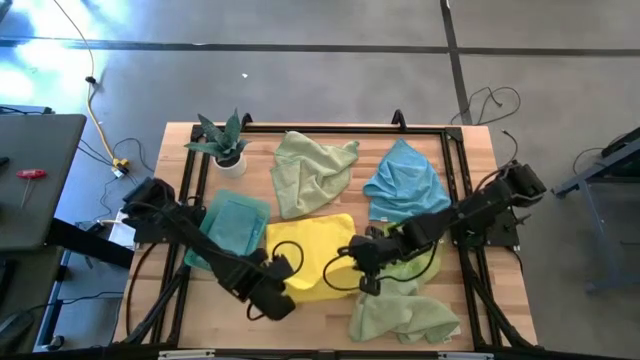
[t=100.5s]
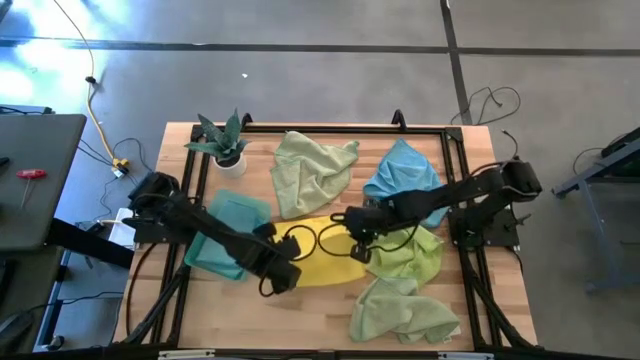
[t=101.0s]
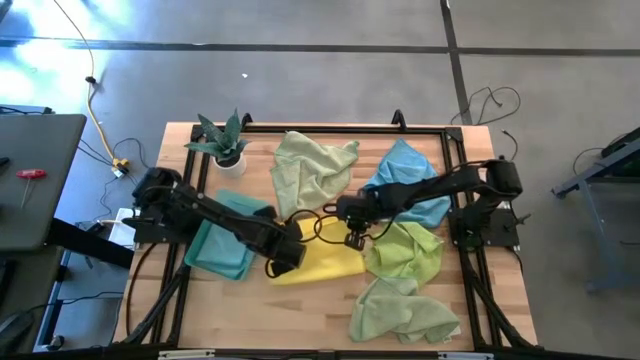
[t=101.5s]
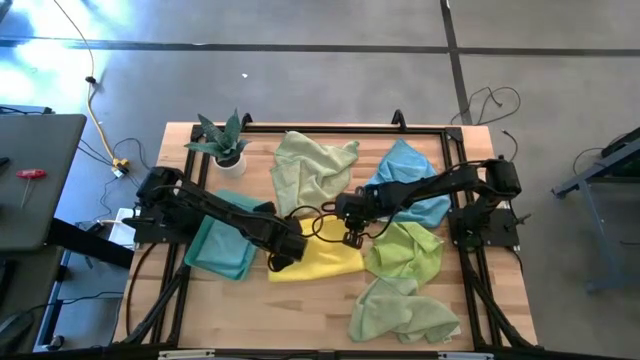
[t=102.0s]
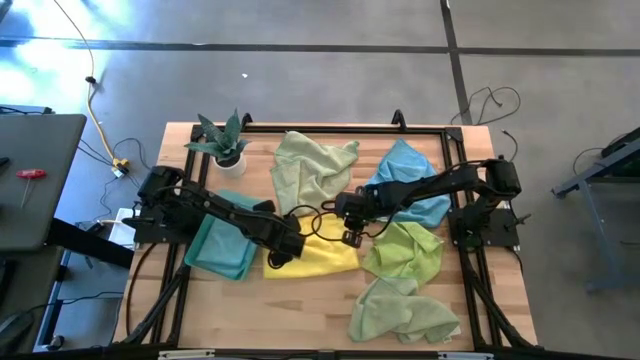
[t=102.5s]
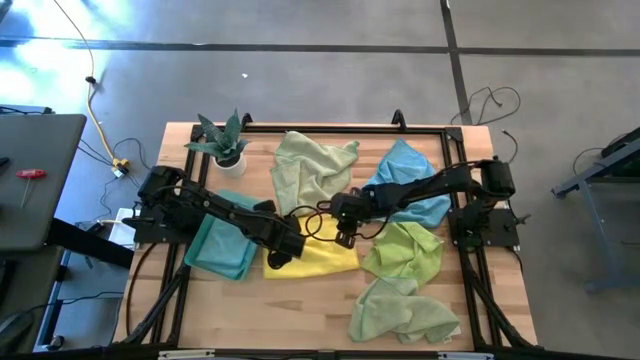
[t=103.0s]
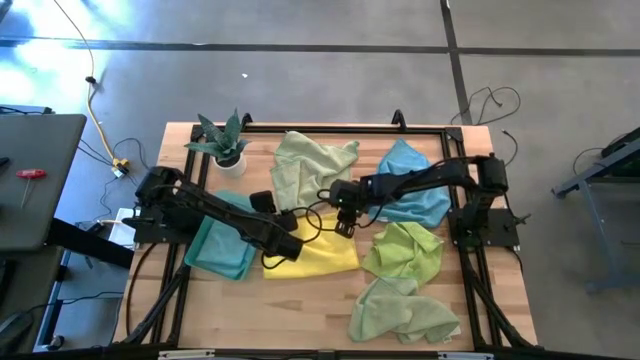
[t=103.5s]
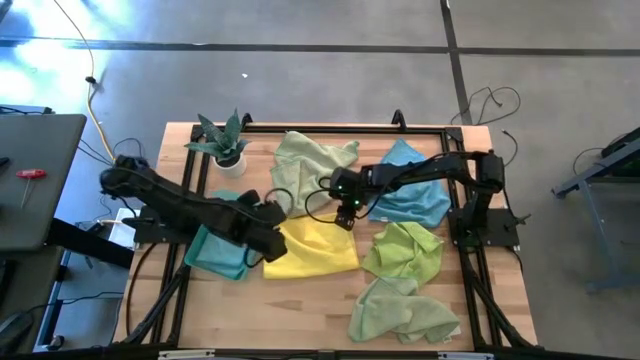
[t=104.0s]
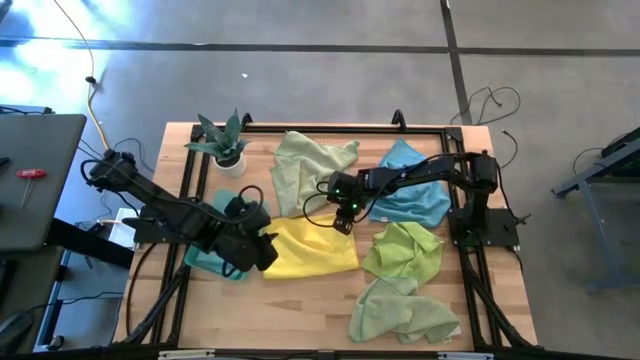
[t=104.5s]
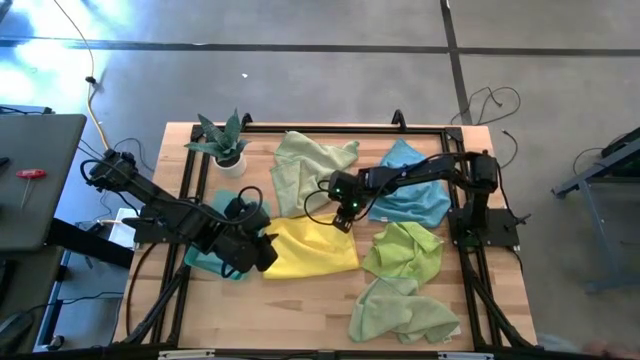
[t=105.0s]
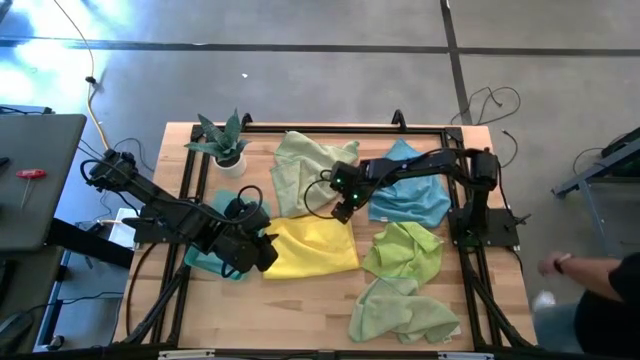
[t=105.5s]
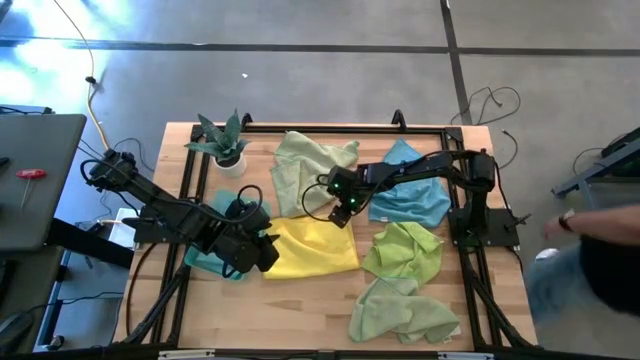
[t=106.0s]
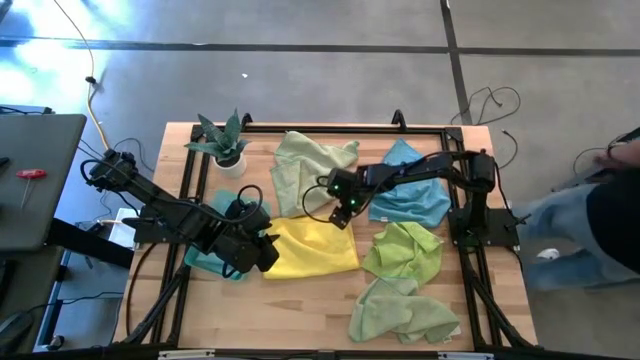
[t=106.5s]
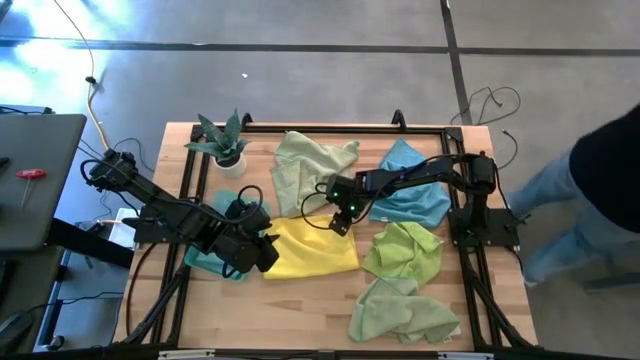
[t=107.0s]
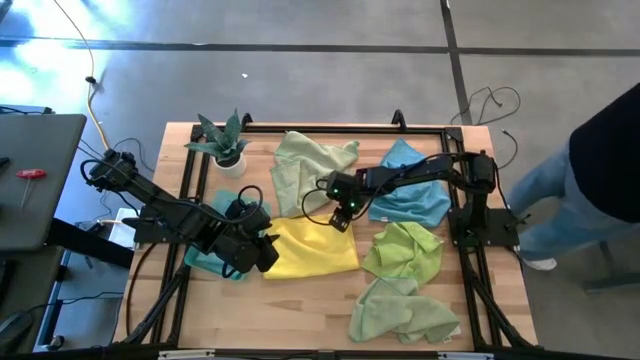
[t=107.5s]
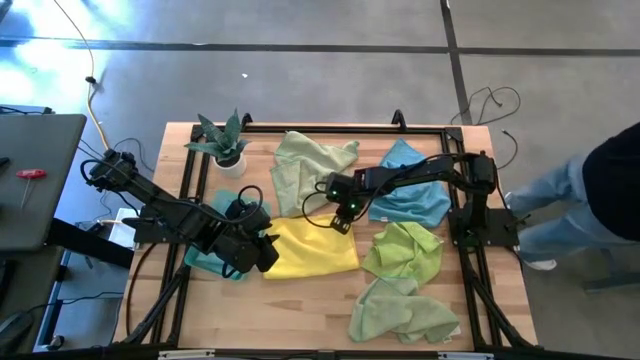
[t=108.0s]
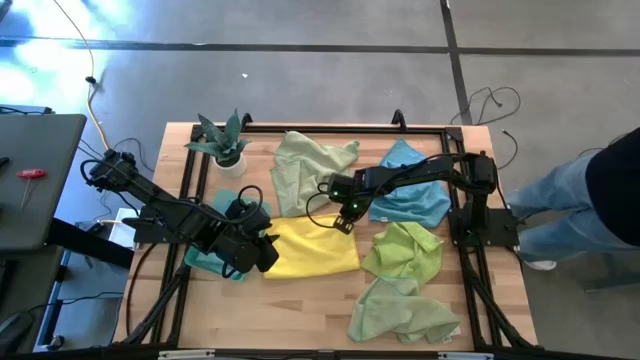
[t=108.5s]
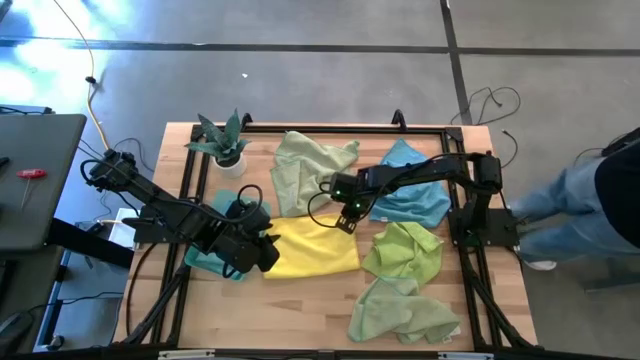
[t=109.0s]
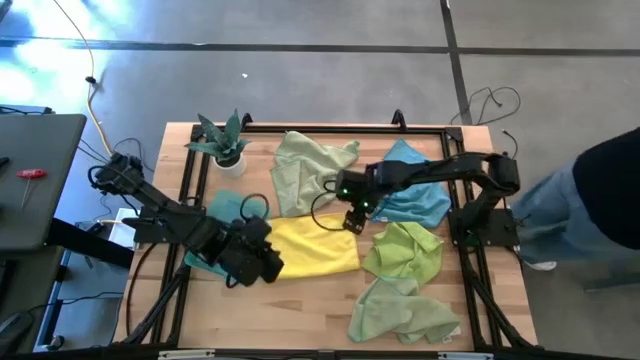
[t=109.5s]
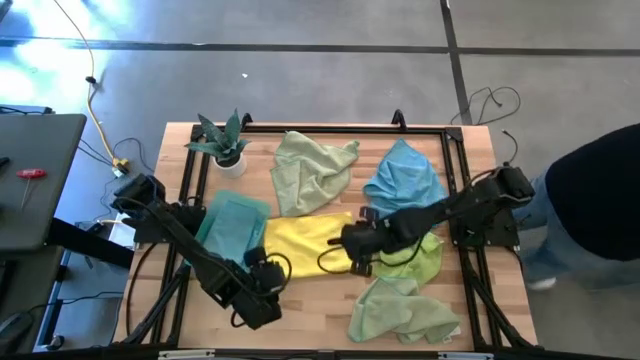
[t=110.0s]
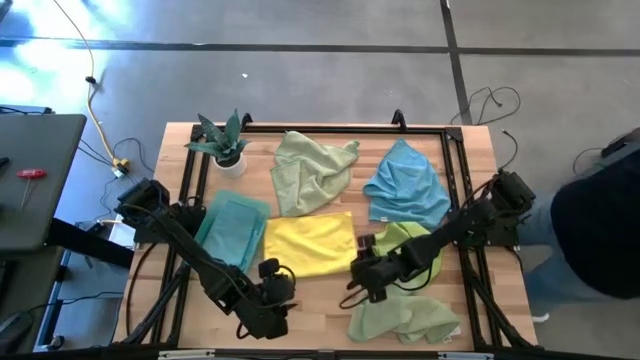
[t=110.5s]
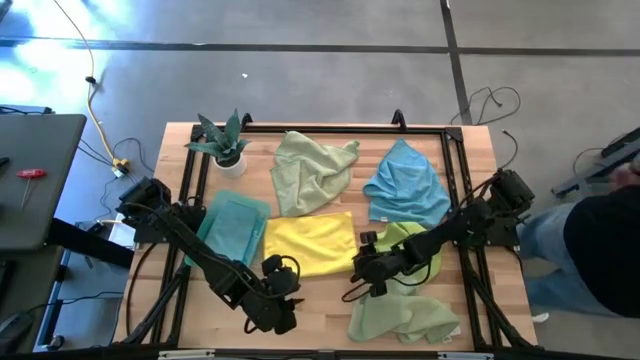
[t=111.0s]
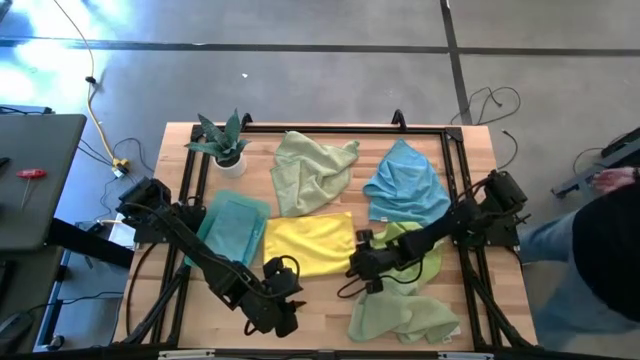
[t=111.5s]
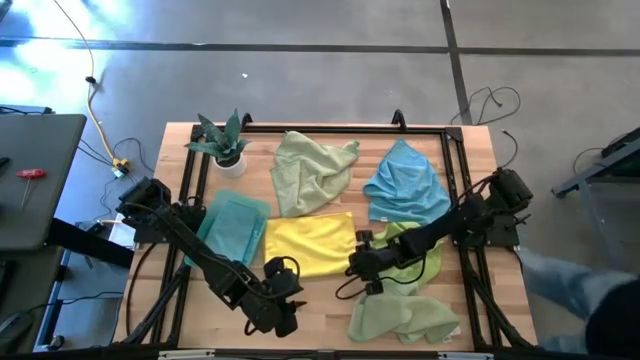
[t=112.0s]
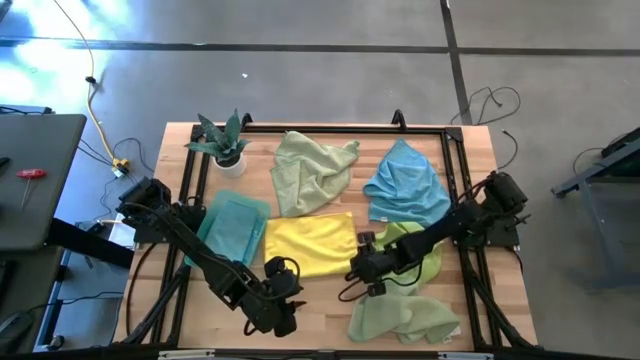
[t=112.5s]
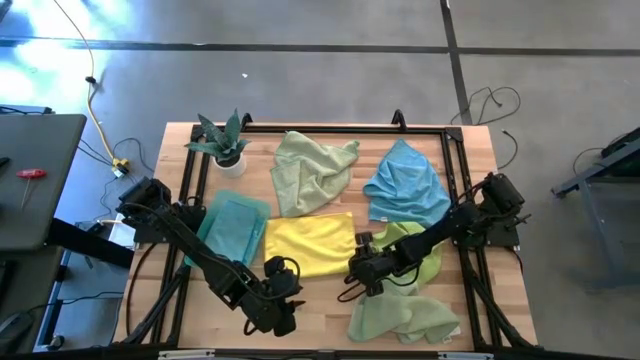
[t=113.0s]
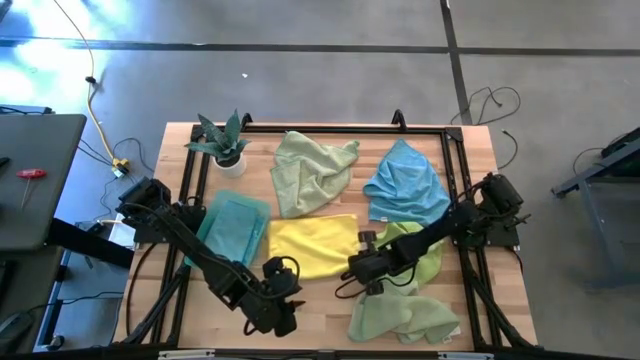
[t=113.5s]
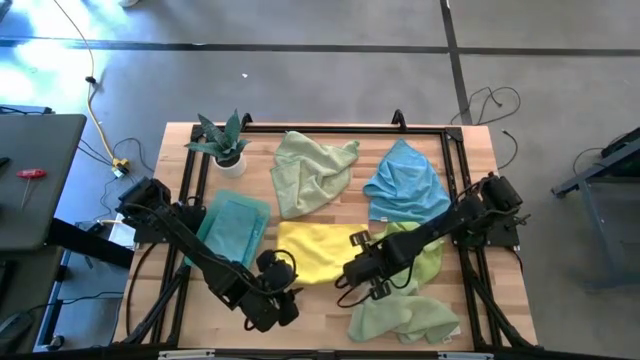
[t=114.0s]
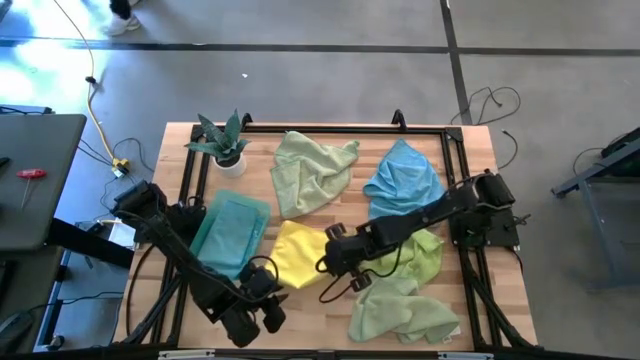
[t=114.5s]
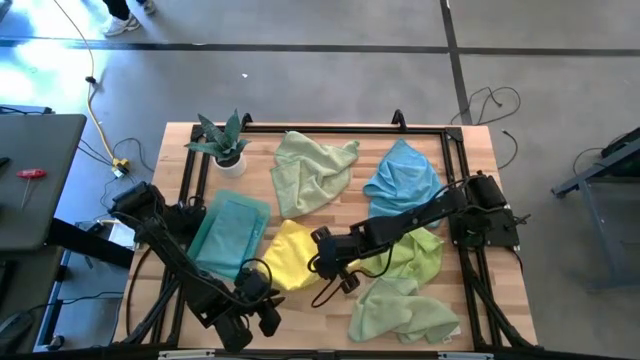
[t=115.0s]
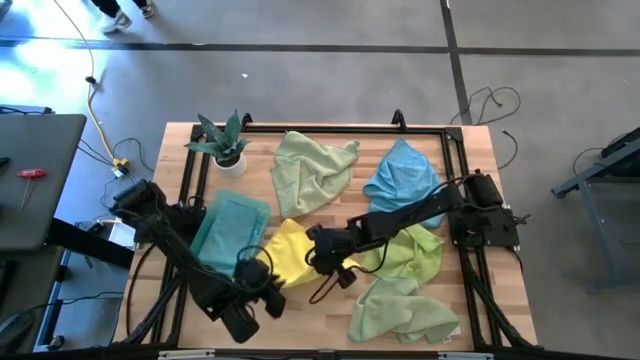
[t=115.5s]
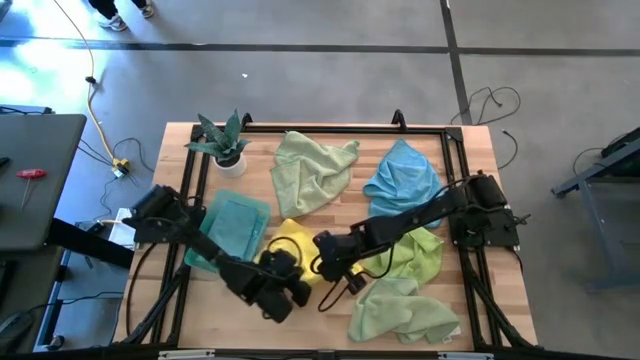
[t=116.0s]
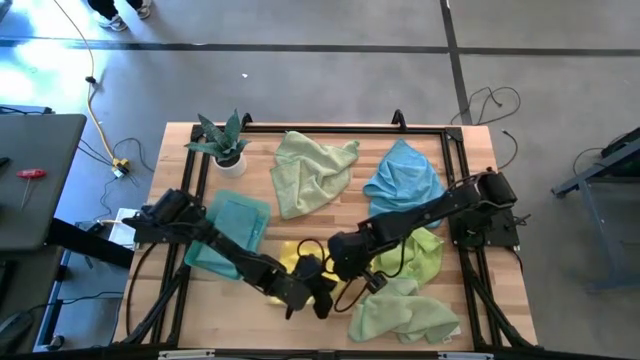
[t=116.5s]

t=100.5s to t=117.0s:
Task: Fold microfiber towels
Fold the yellow microfiber towel

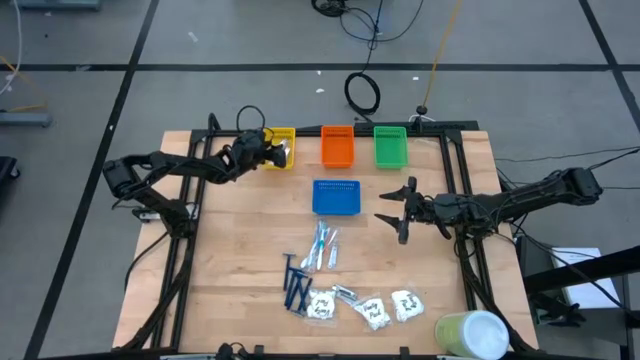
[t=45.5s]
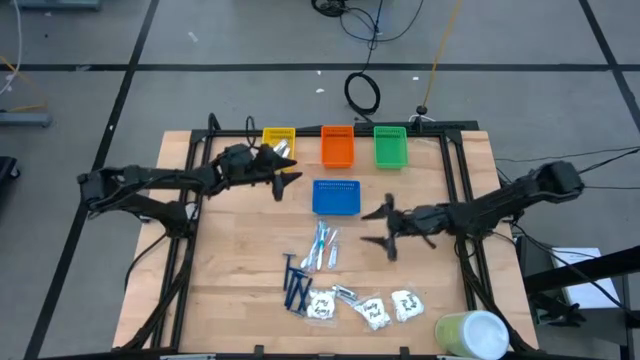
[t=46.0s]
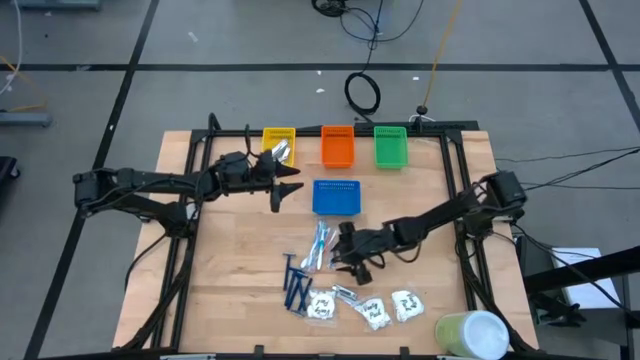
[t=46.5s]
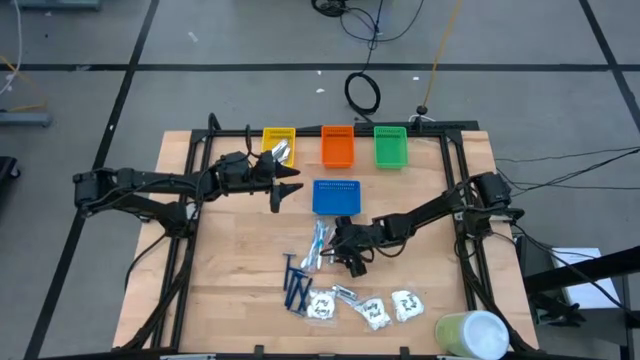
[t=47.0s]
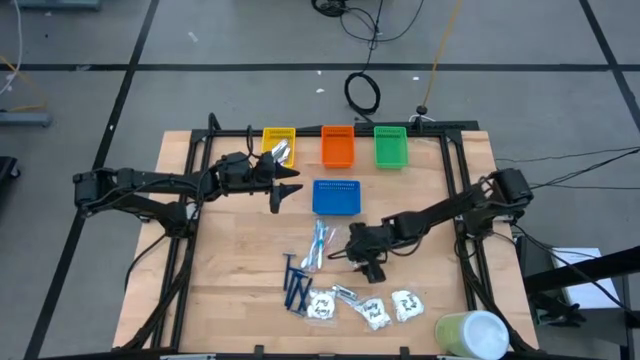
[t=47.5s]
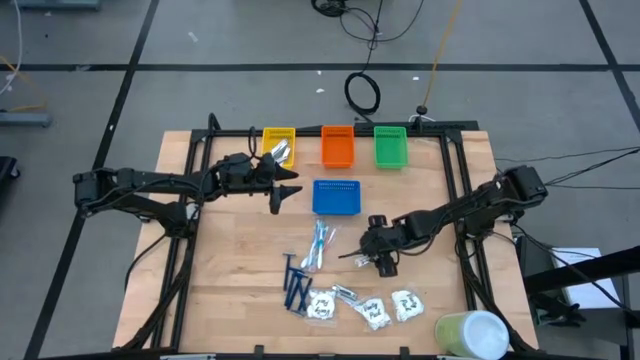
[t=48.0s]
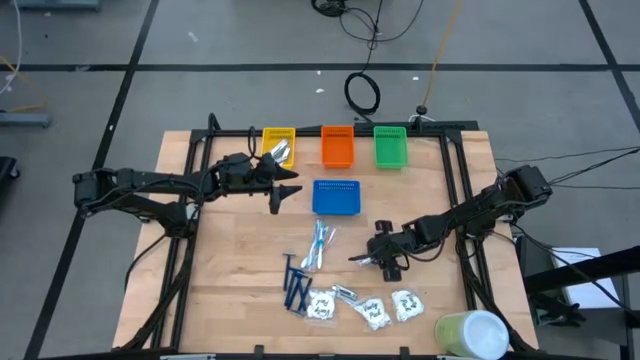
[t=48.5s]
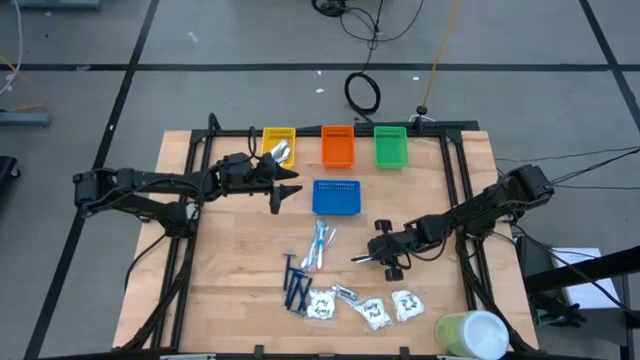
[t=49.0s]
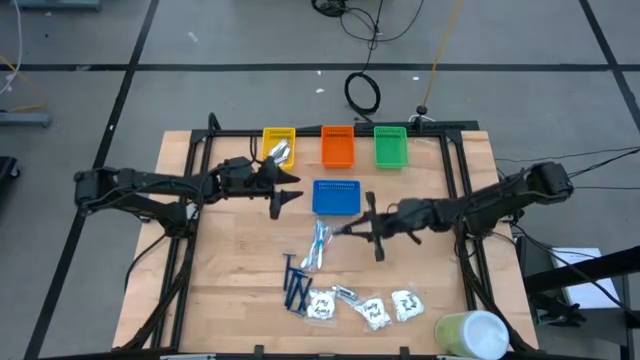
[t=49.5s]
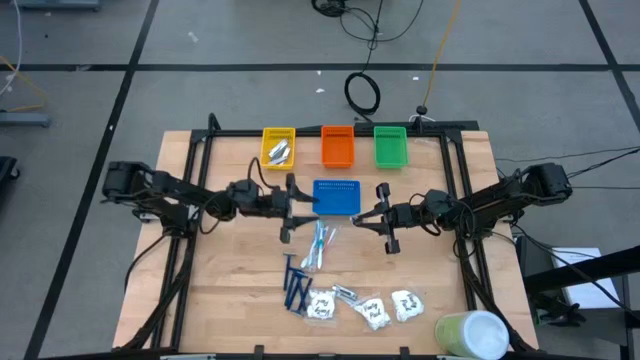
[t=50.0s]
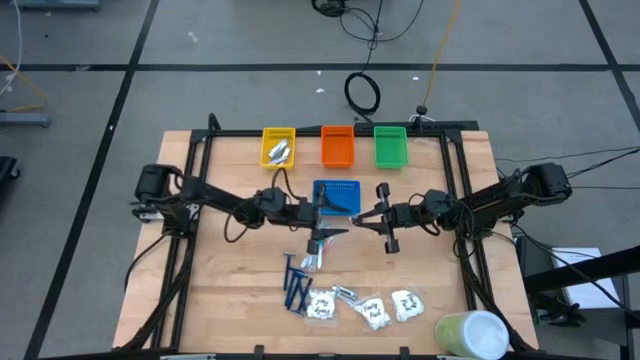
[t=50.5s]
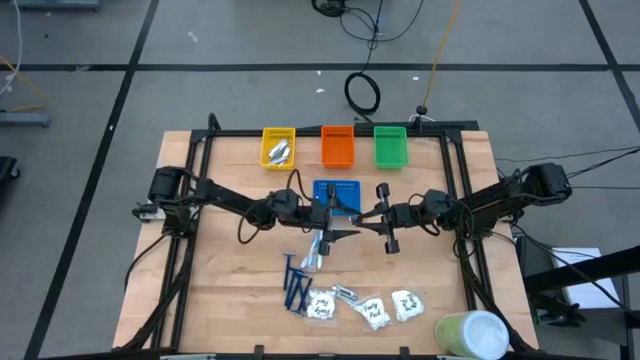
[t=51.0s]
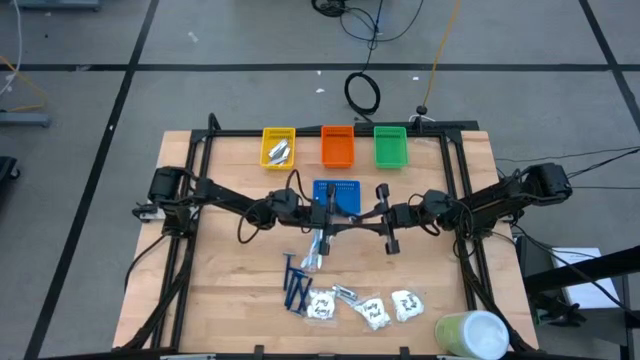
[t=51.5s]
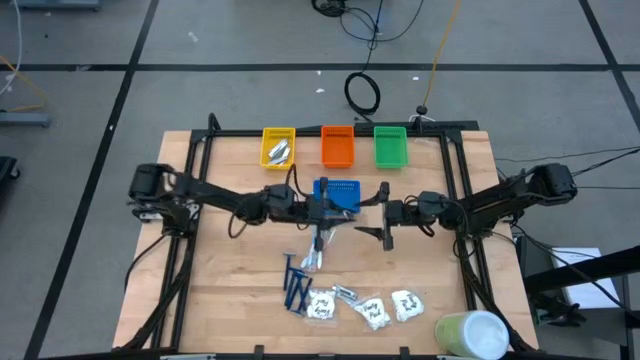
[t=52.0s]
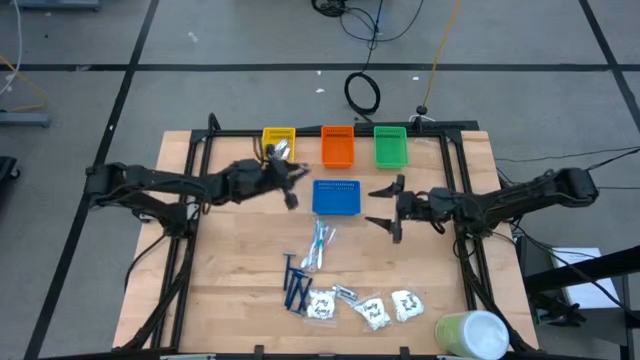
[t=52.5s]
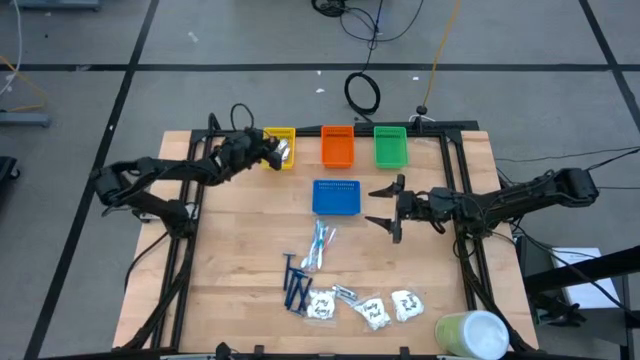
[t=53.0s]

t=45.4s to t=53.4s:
Task: Pick & Place Travel size toiletries
Put the silver nail cutter into the yellow basket
